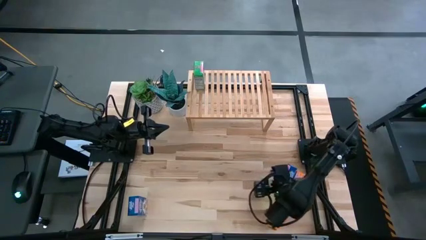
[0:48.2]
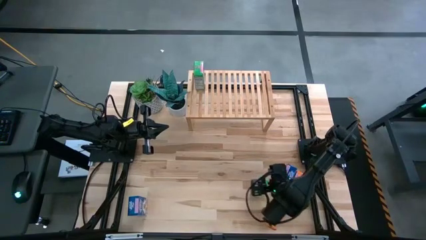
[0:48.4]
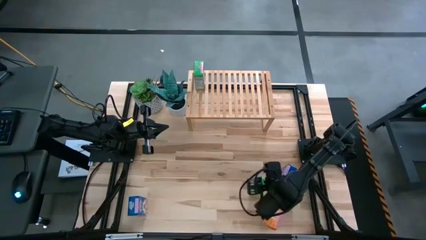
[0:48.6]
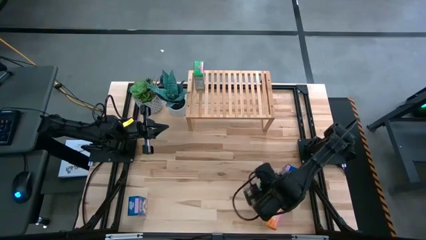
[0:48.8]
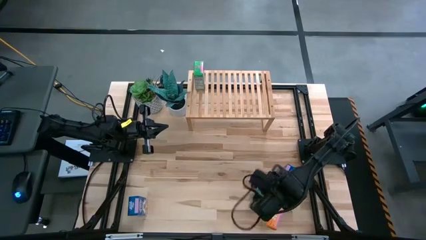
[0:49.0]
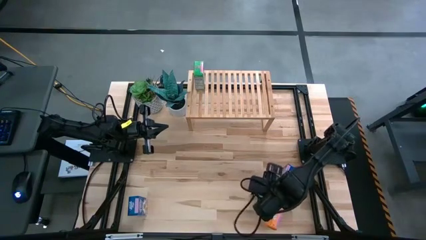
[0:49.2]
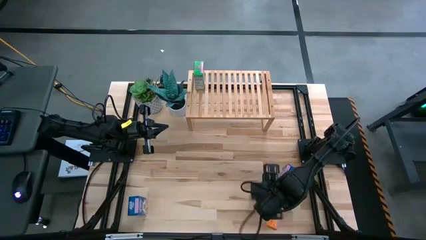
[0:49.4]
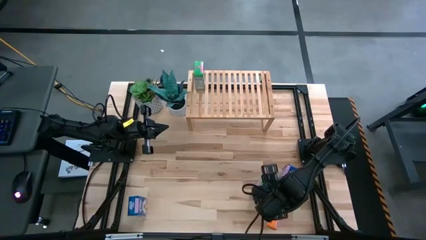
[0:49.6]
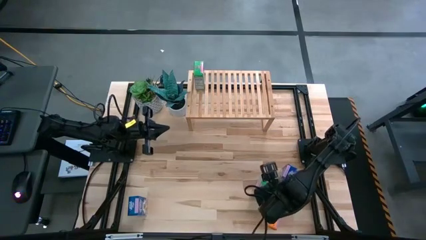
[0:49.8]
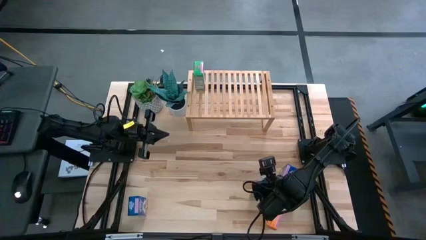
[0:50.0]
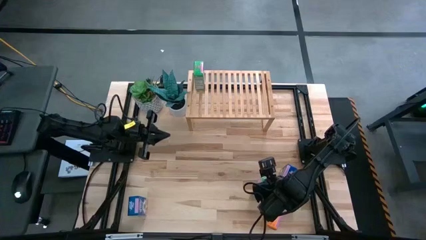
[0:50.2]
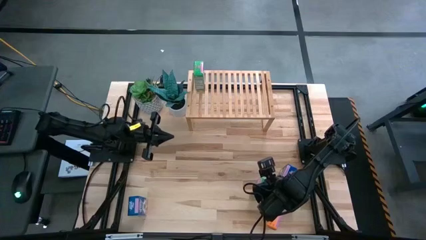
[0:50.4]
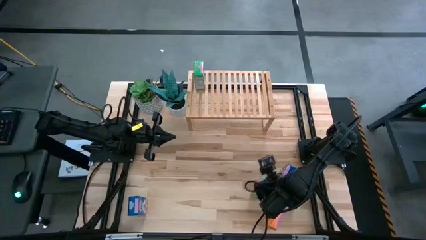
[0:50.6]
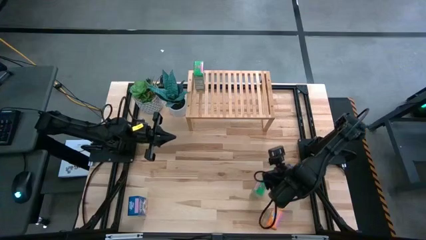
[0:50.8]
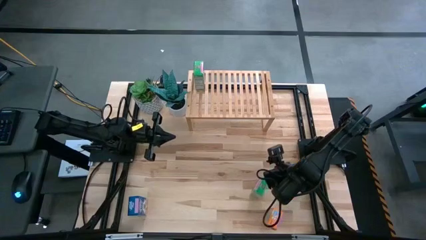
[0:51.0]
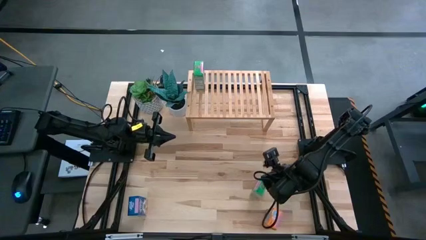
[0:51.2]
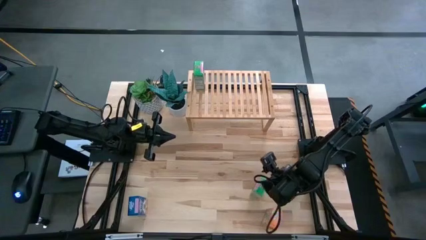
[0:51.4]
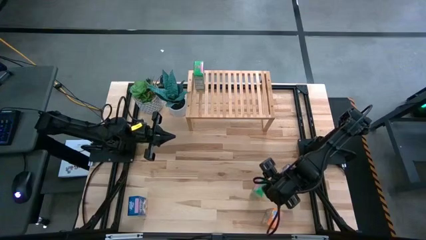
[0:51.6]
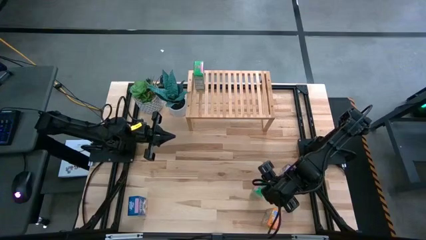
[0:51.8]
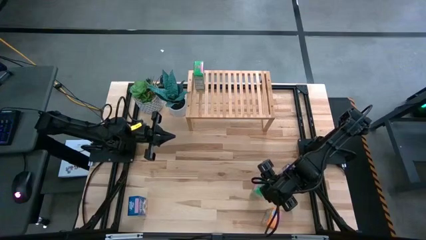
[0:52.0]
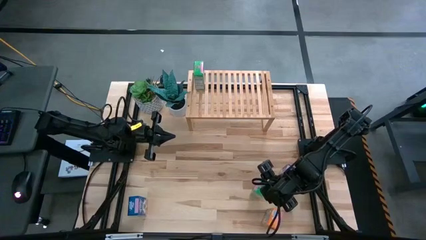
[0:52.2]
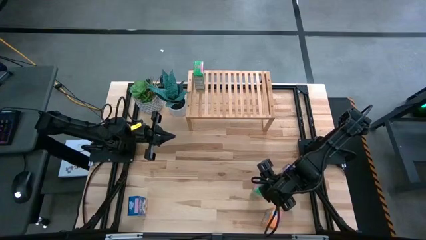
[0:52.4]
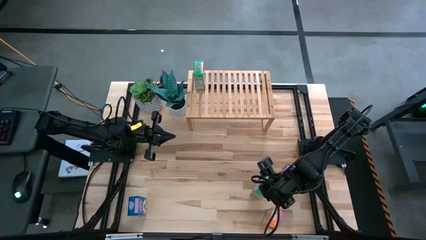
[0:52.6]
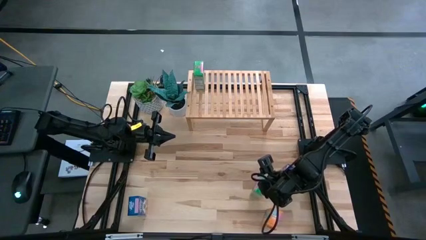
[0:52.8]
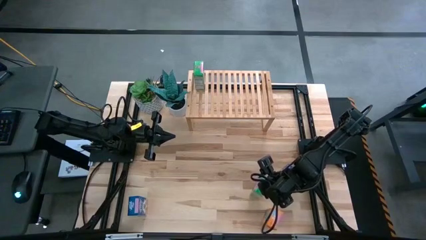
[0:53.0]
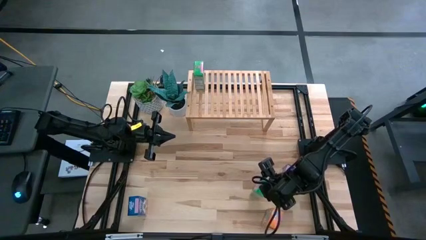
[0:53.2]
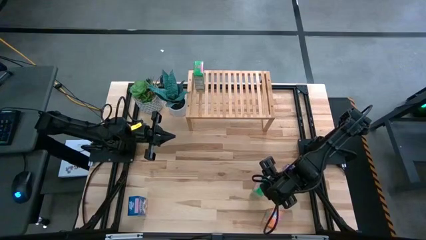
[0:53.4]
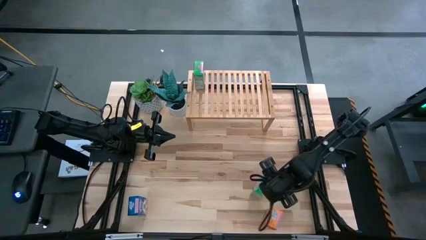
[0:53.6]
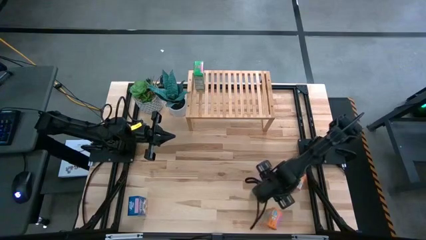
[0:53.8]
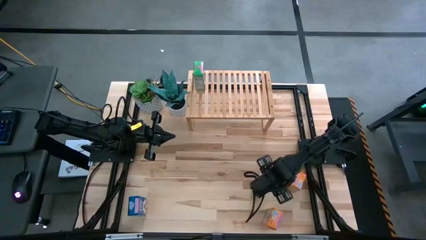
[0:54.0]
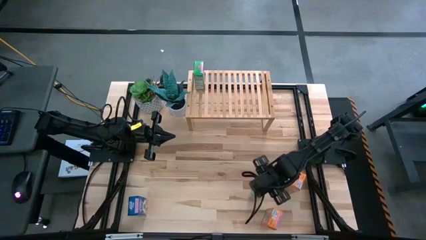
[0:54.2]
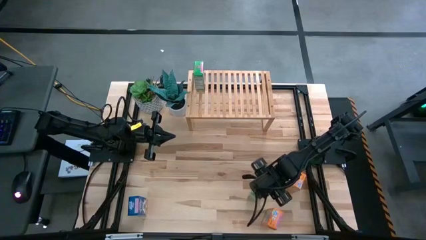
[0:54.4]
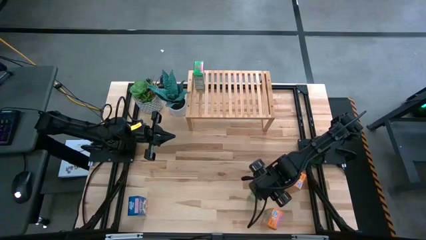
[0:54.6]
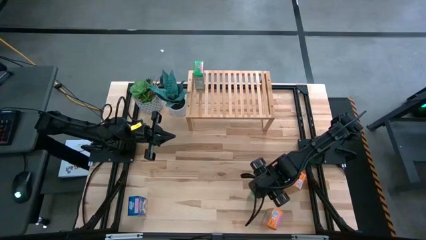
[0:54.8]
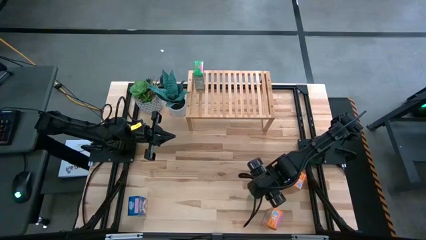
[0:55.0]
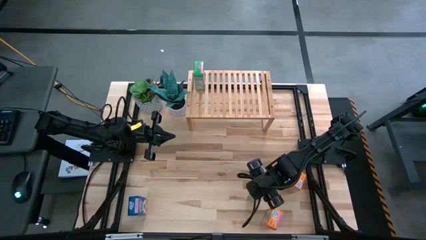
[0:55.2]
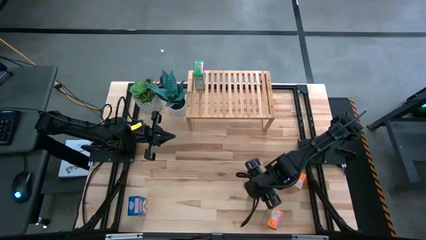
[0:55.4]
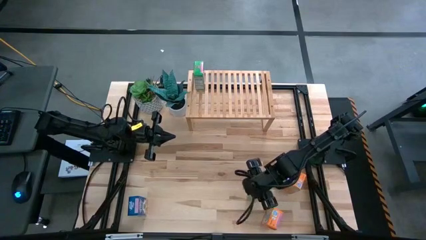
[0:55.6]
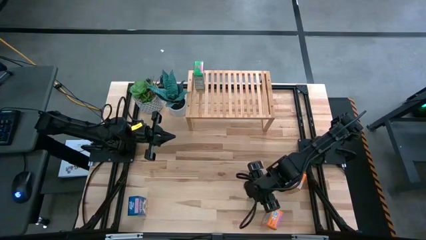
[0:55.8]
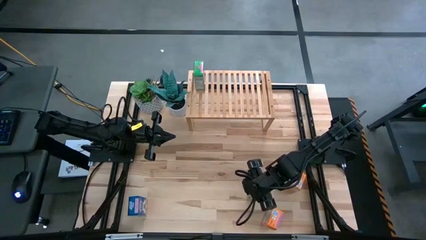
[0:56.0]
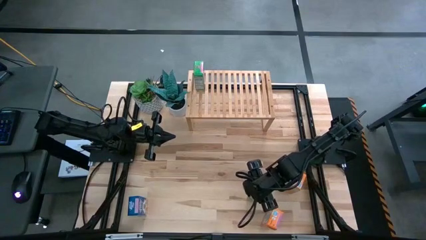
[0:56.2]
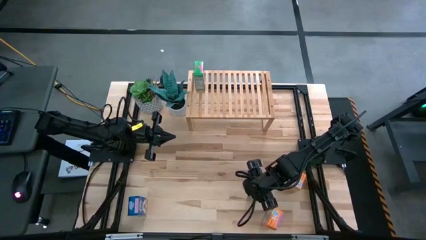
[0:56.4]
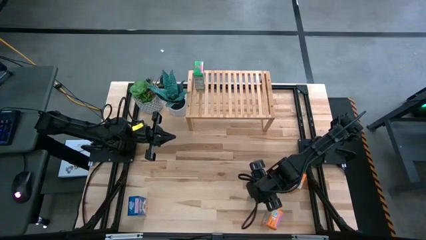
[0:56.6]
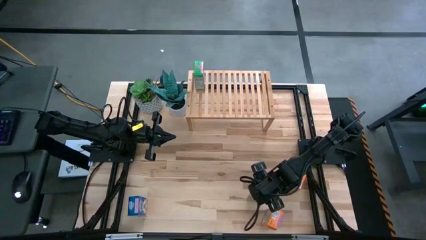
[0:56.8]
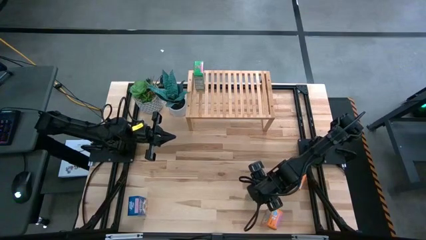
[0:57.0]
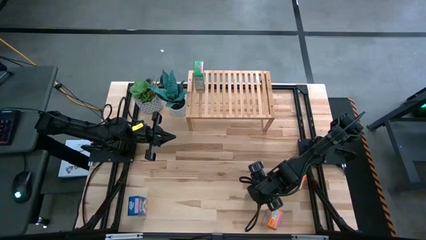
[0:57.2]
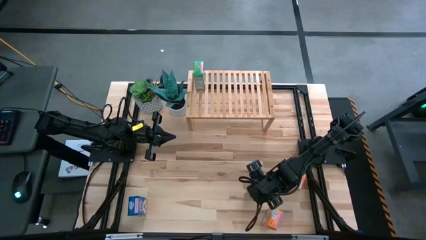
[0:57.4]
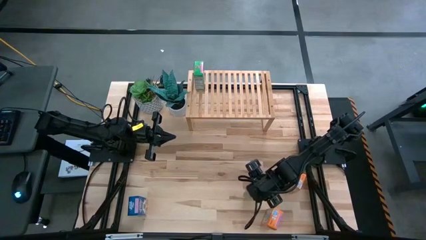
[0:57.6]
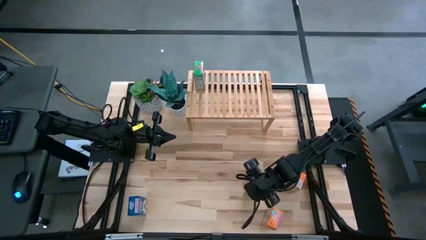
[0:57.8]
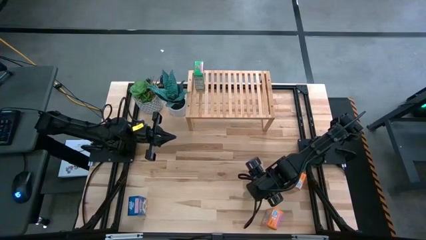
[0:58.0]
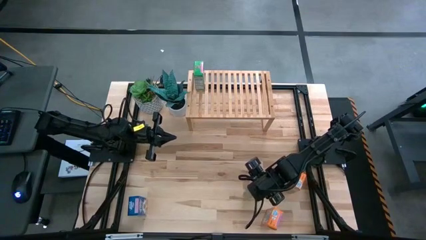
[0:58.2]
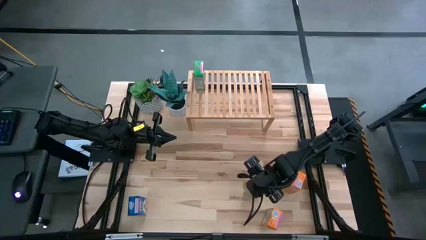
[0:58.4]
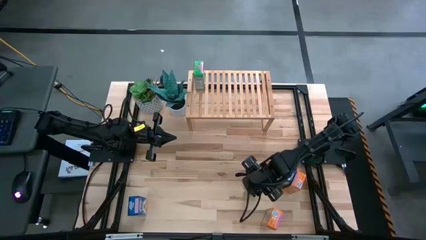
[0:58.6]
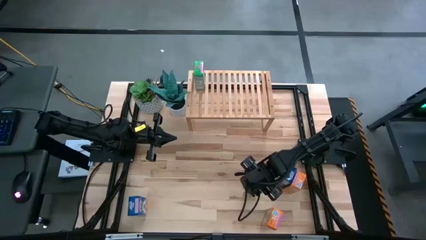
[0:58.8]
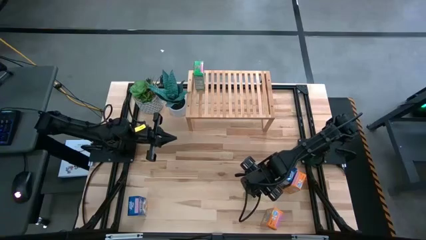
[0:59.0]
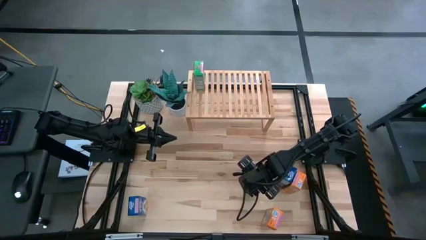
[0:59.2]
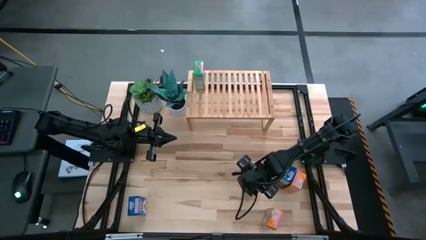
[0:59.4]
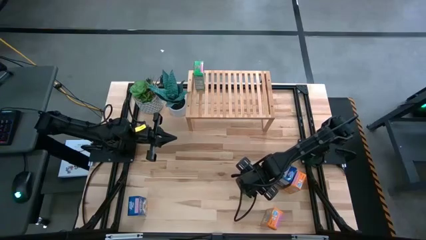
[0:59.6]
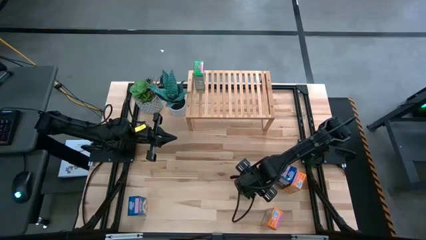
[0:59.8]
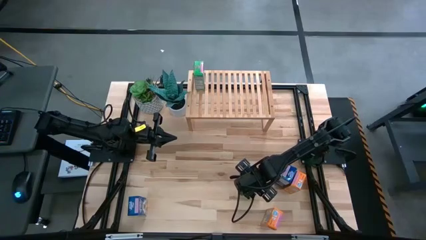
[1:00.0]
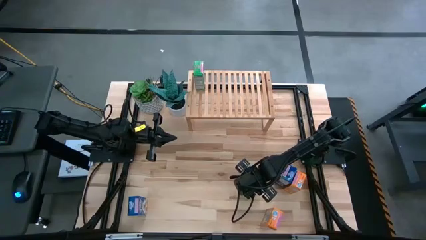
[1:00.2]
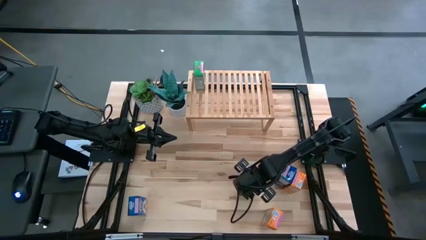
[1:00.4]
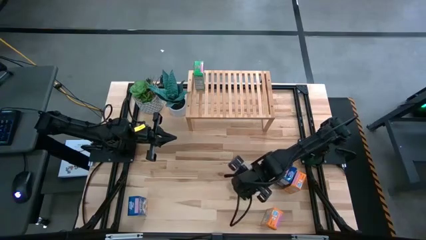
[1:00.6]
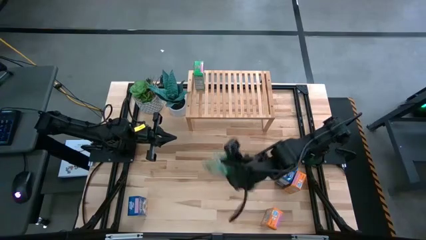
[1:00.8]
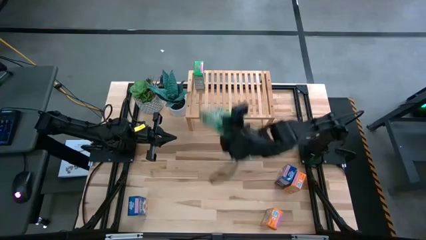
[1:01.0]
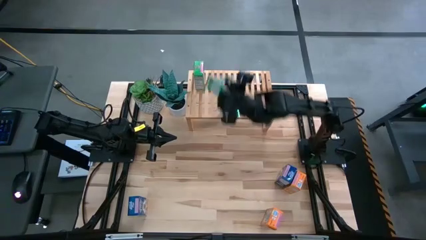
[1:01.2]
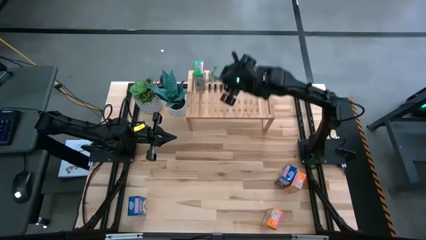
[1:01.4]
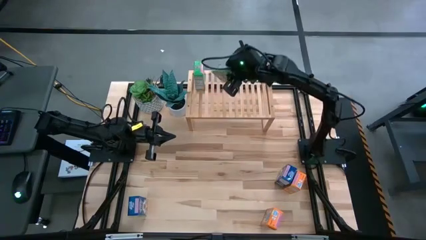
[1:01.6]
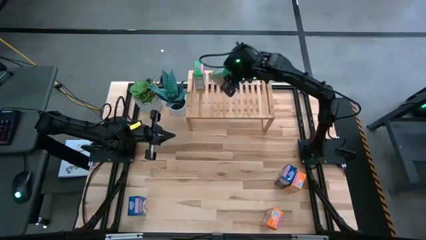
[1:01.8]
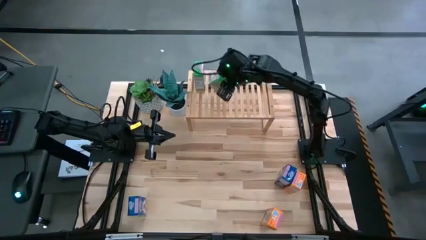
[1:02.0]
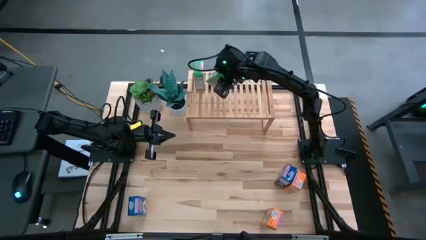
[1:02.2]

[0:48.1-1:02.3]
Task: Stack cereal on shelf
Put the green cereal box on the shelf aligned with the other green cereal box

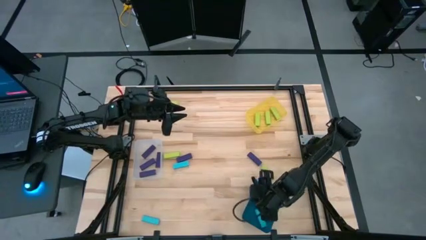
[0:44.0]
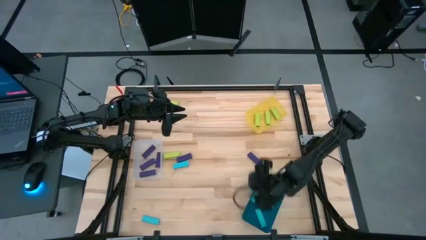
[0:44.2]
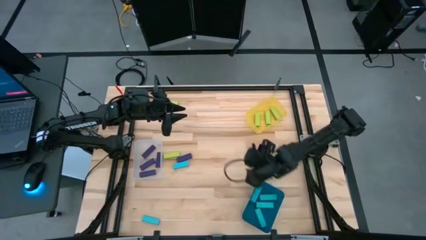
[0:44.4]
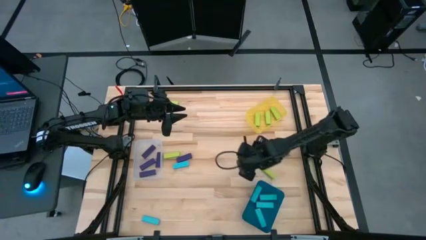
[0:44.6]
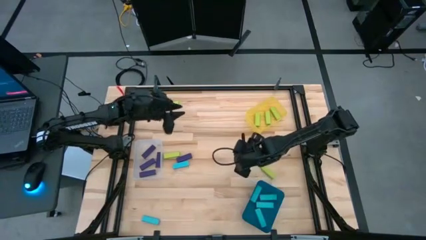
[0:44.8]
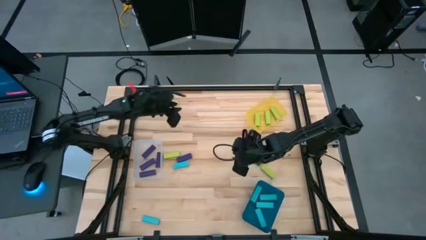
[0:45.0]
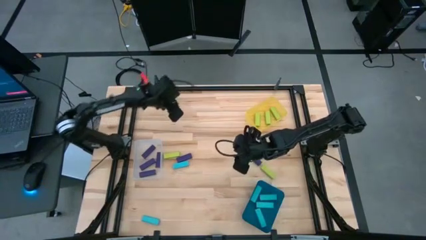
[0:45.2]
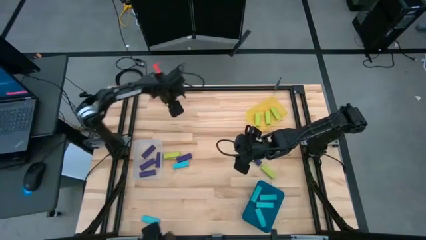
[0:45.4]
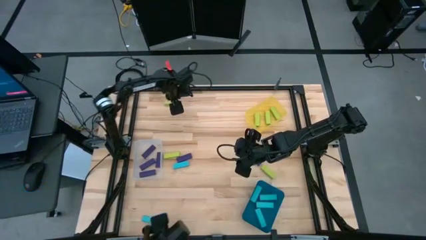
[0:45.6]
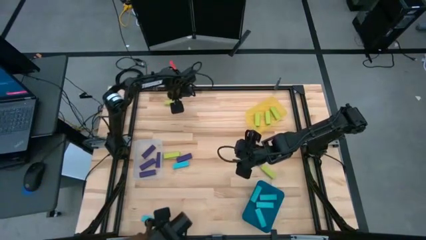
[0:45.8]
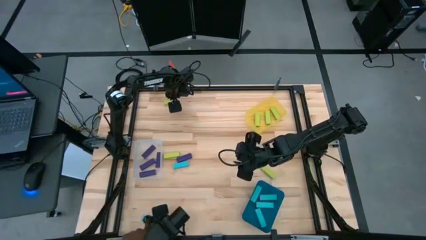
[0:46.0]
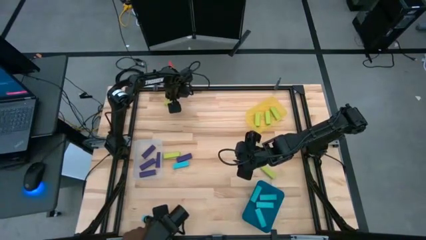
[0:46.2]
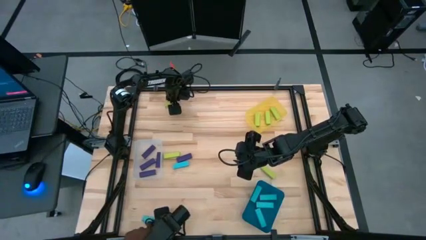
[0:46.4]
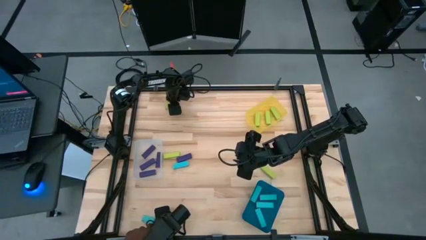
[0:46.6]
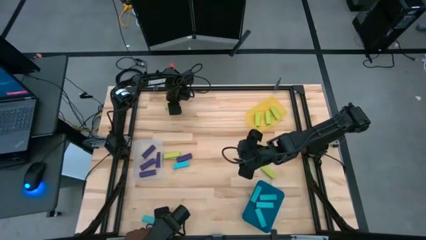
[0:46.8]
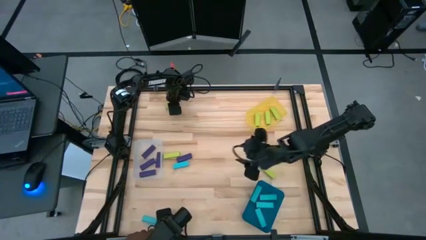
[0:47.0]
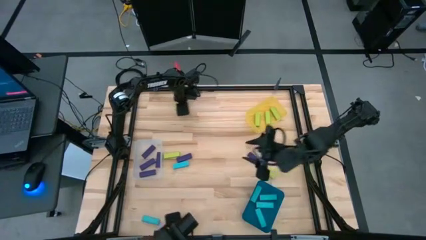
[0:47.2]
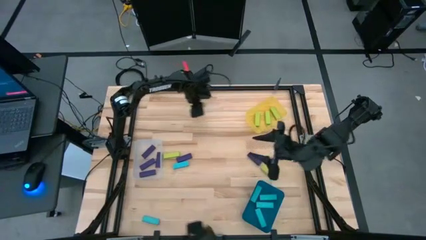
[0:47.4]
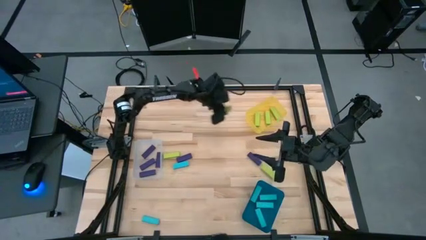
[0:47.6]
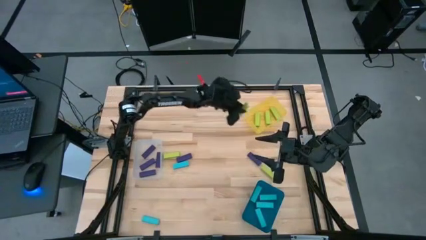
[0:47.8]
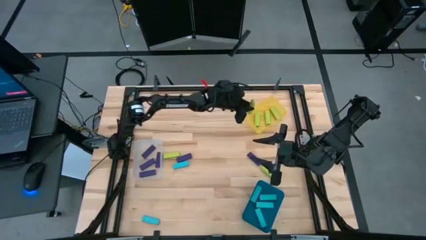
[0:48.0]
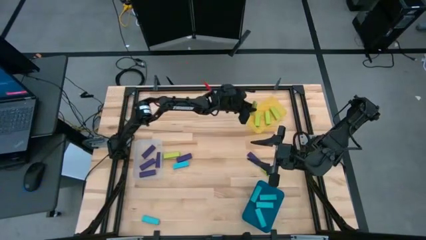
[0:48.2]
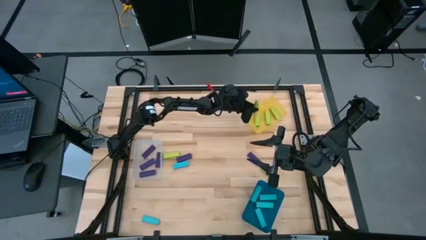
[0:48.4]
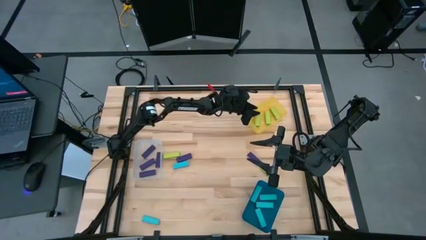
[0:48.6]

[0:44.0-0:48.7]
Task: Sort blocks
Put the green block into the yellow bin
